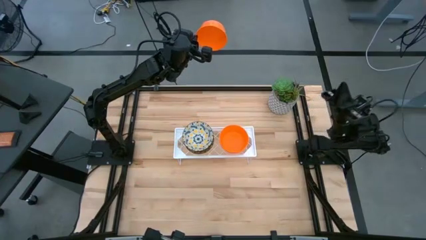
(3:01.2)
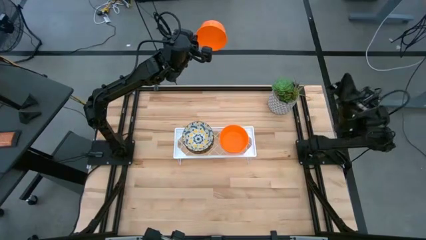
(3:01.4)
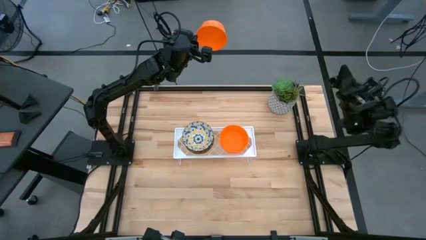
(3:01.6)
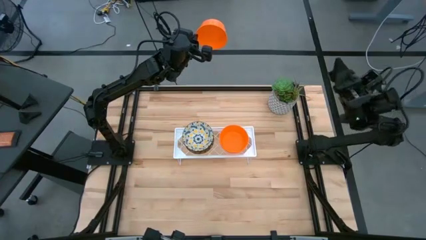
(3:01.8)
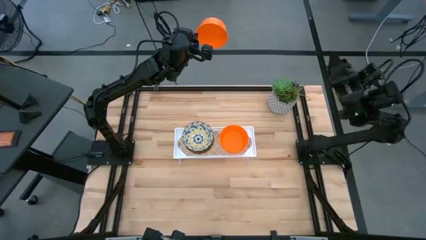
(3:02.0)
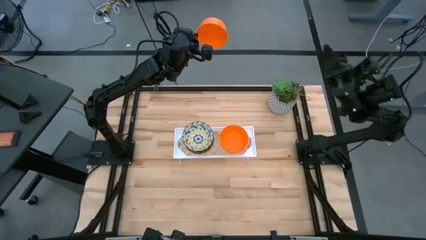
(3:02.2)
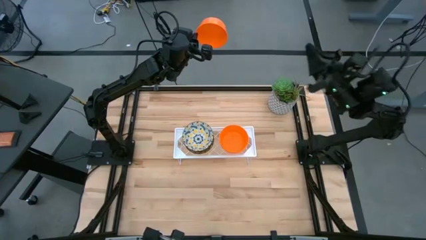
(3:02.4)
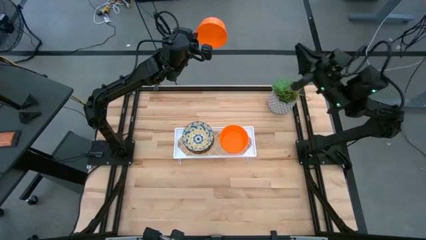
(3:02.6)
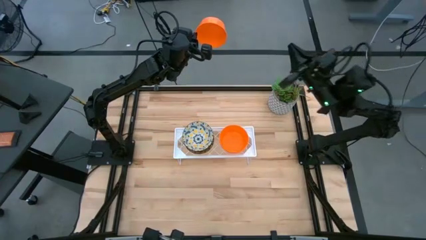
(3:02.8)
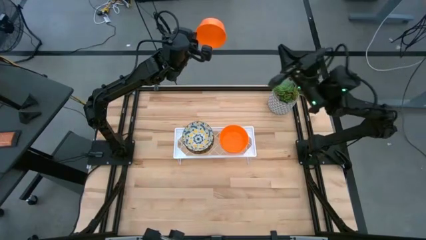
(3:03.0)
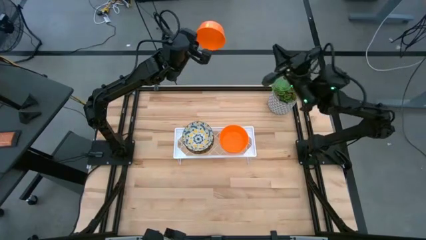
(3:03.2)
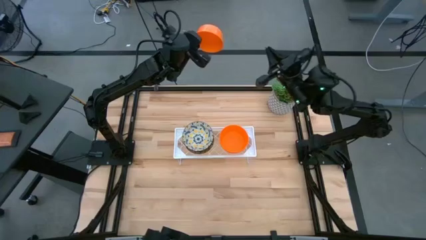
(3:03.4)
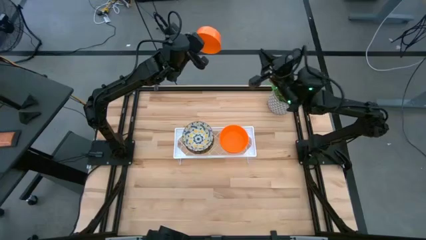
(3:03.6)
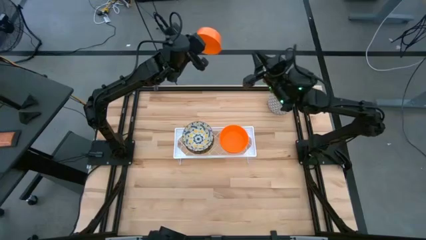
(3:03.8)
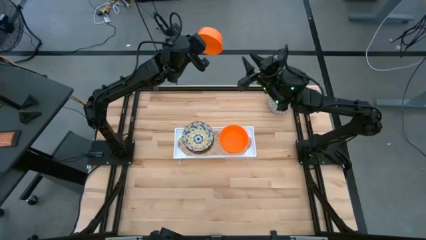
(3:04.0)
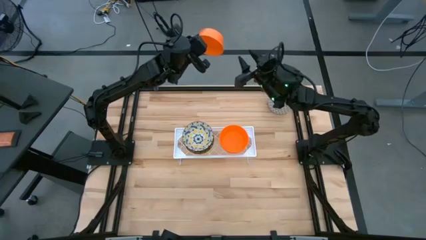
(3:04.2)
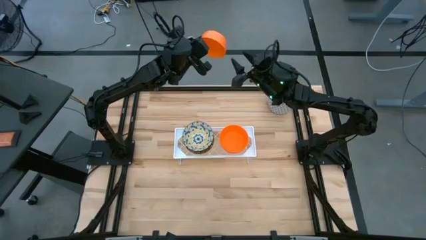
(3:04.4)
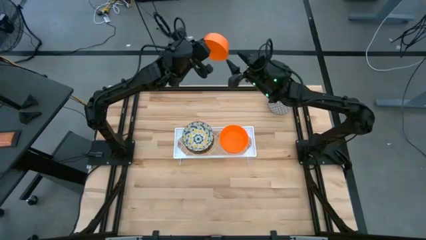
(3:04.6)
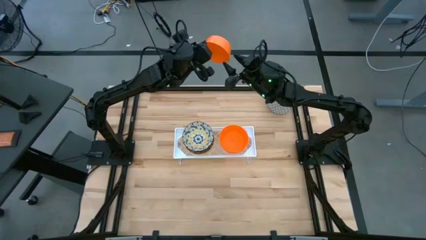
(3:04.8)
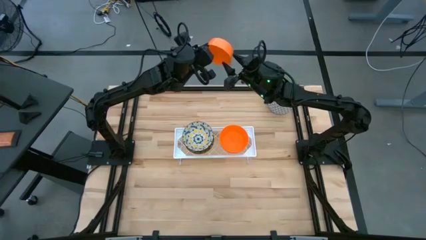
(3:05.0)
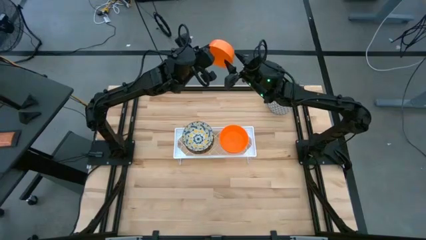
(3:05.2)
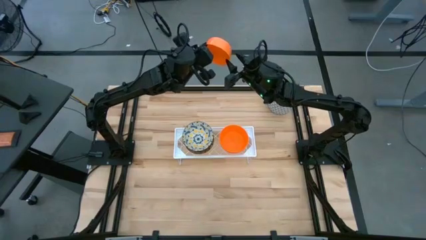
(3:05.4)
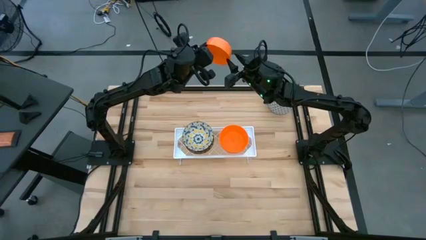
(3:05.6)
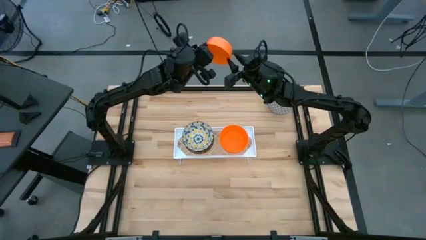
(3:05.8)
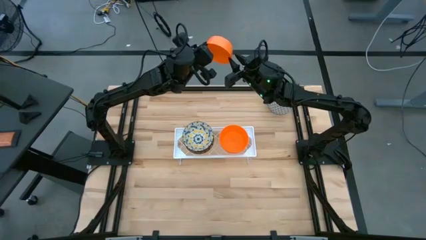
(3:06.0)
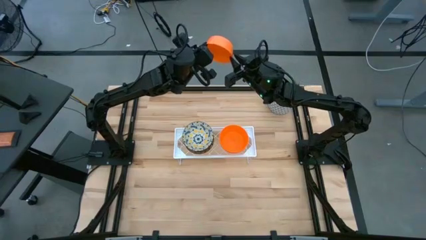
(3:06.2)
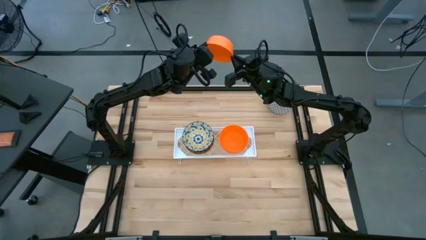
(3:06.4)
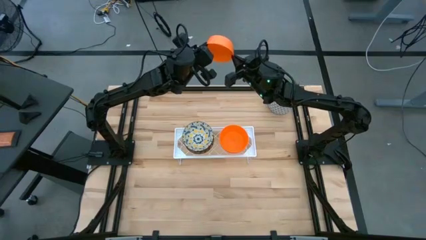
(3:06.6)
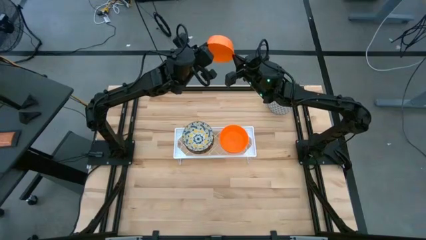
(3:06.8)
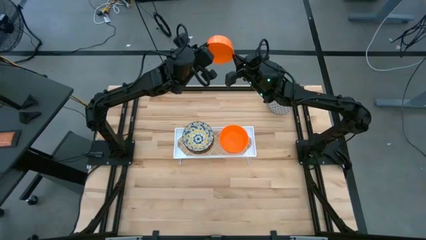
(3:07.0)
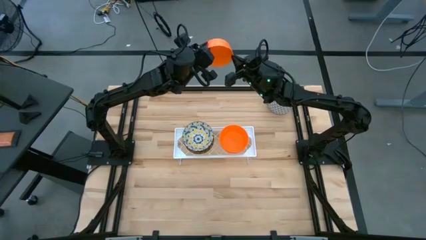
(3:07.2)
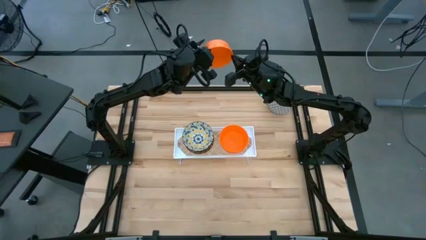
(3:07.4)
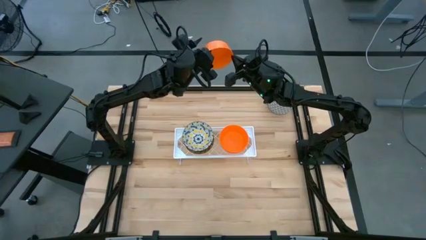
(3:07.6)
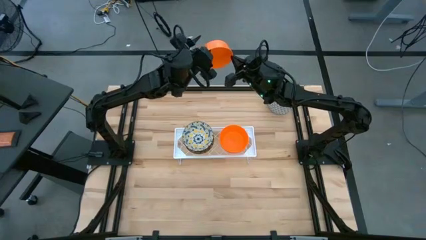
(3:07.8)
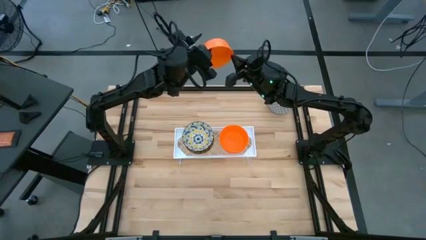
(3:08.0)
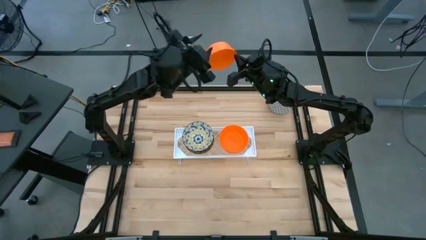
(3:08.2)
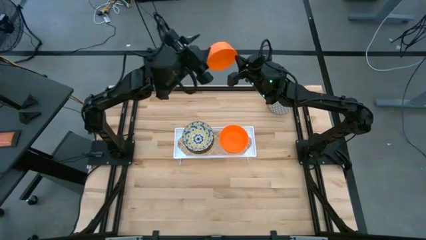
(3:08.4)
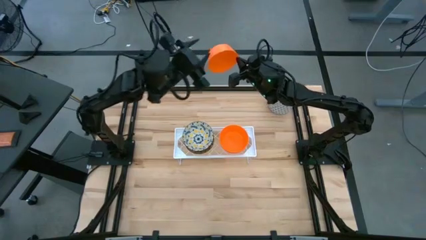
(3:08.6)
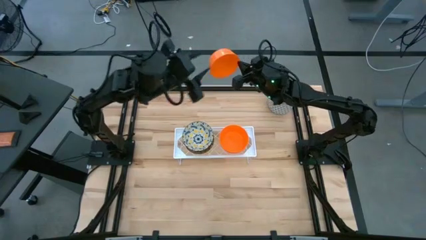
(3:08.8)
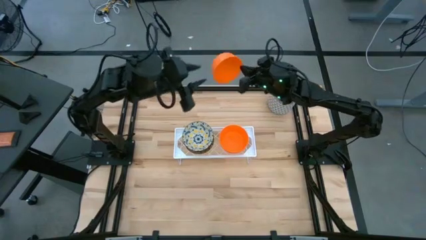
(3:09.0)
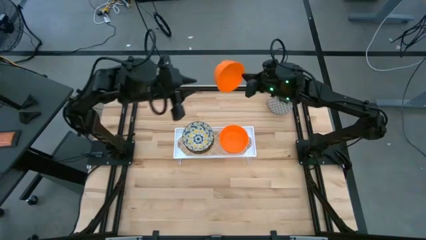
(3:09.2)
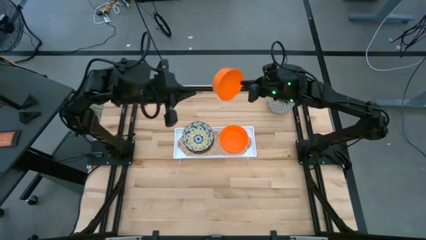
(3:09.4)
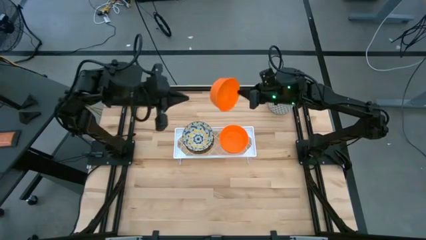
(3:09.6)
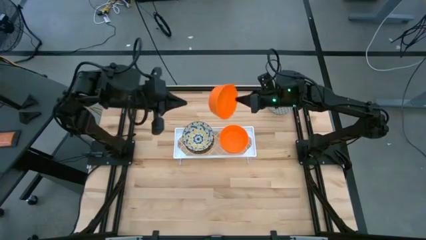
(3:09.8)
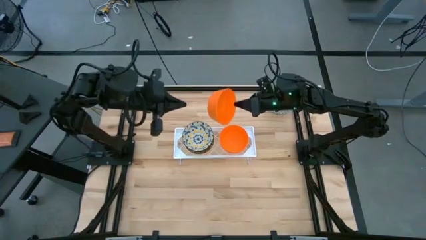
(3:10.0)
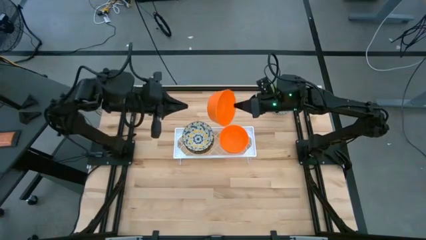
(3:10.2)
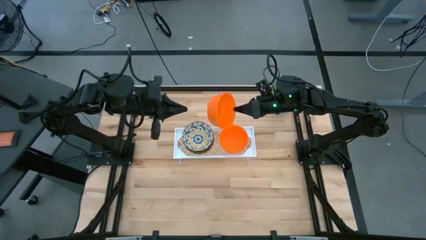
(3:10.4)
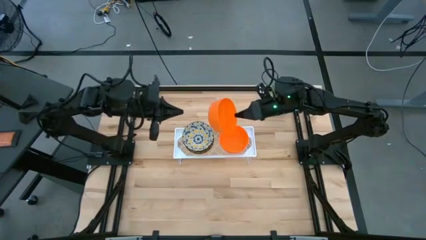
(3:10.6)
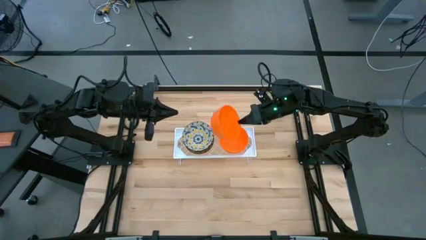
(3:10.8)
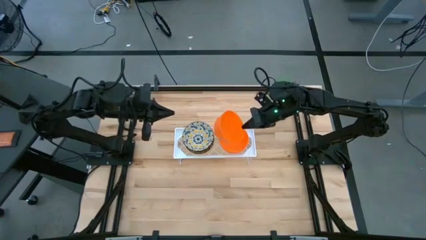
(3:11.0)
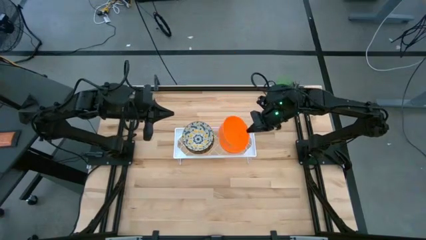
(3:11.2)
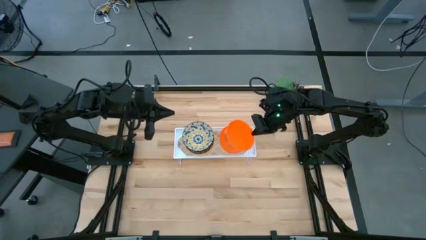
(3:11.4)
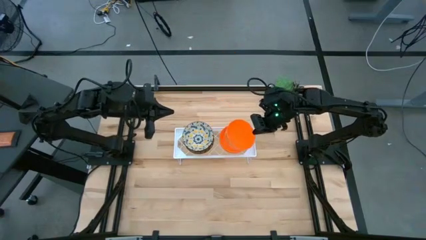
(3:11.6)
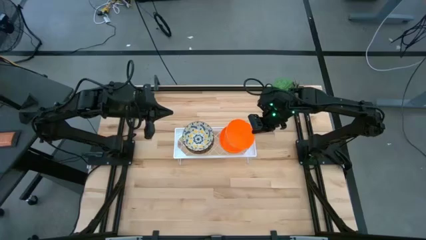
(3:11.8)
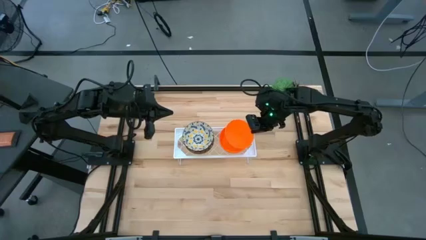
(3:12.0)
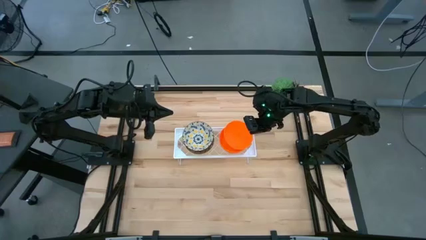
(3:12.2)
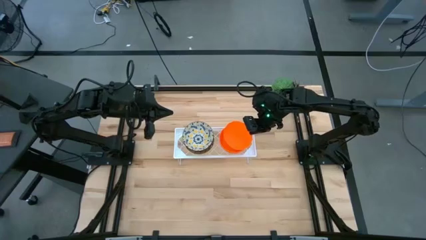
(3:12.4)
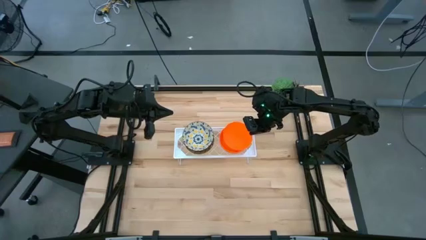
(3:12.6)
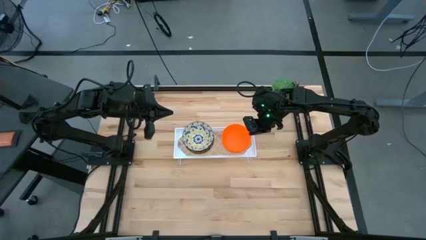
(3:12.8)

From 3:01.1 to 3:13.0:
Task: Pick & Place Mini bowls
Stack the orange bowl on the orange bowl on the shelf
